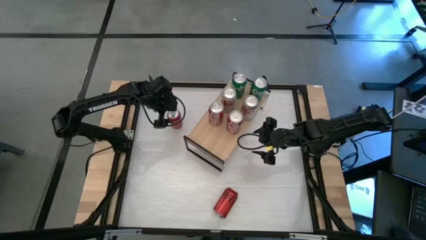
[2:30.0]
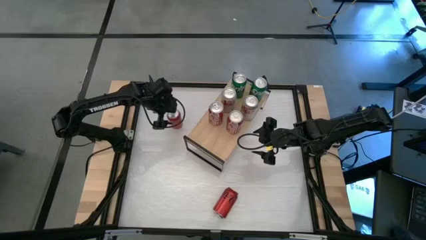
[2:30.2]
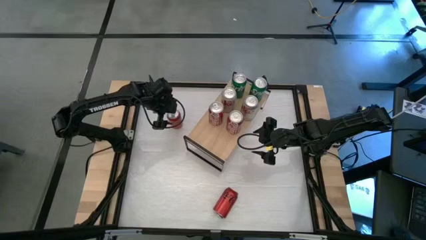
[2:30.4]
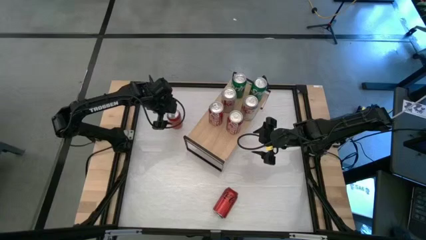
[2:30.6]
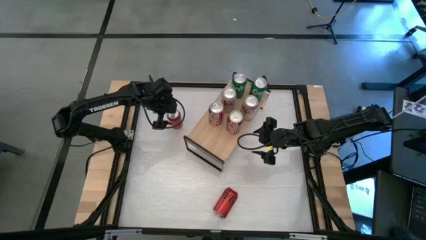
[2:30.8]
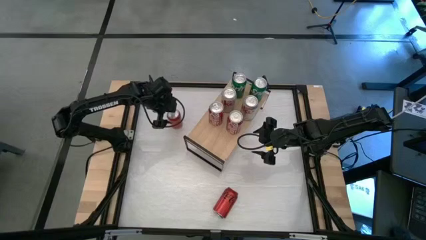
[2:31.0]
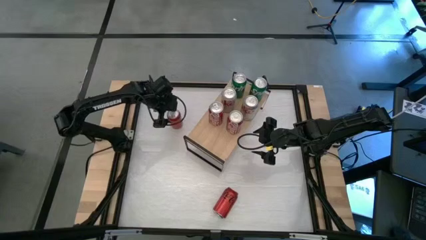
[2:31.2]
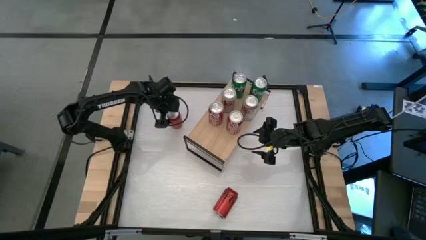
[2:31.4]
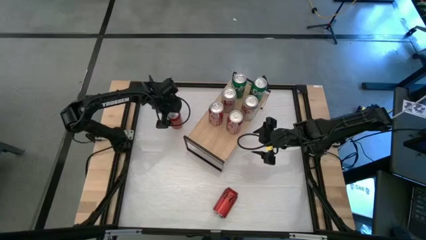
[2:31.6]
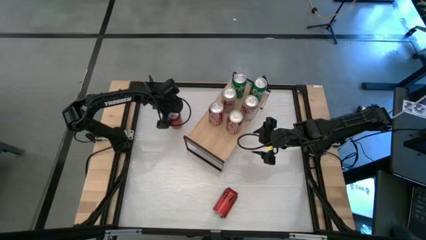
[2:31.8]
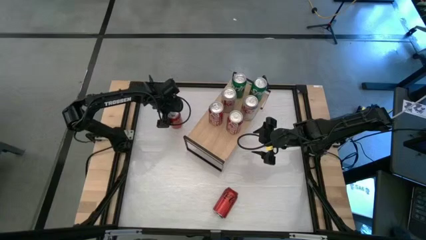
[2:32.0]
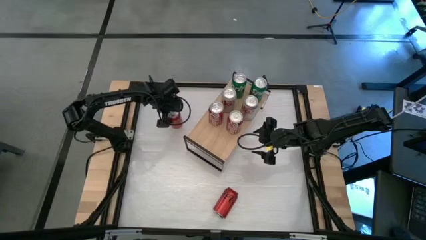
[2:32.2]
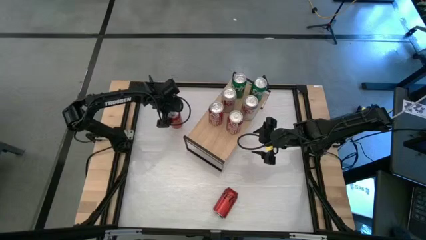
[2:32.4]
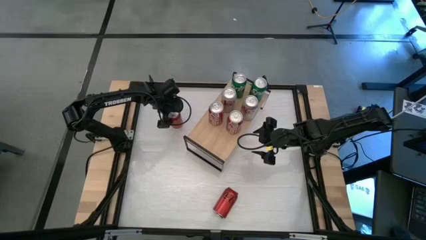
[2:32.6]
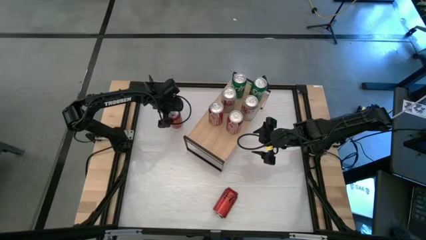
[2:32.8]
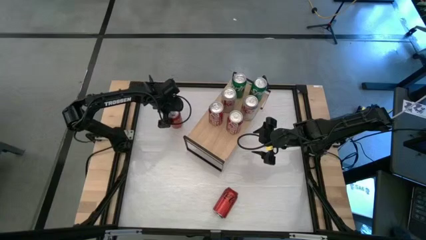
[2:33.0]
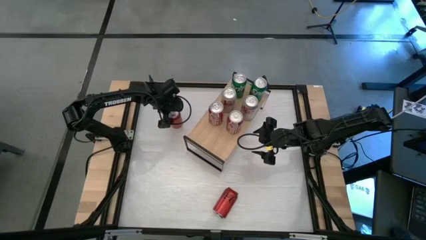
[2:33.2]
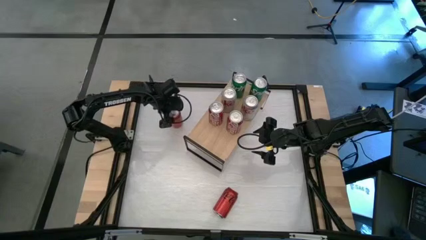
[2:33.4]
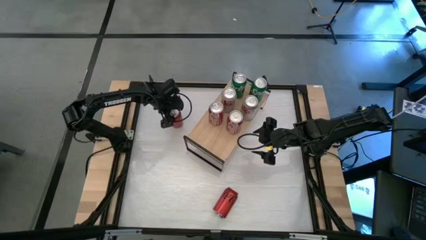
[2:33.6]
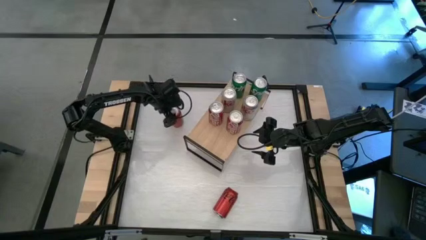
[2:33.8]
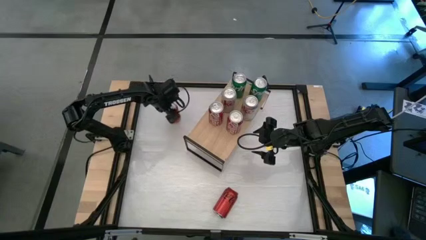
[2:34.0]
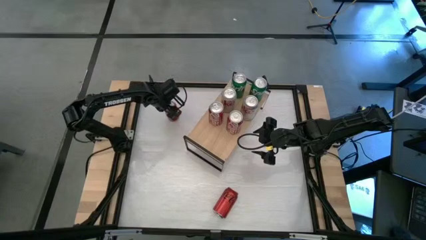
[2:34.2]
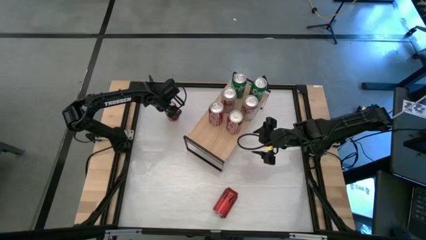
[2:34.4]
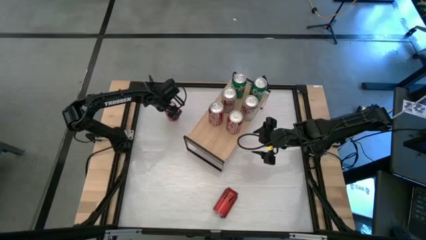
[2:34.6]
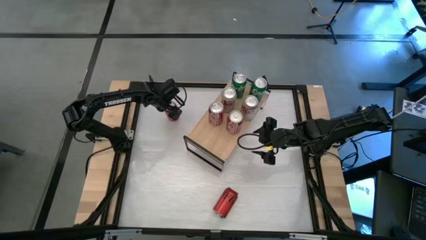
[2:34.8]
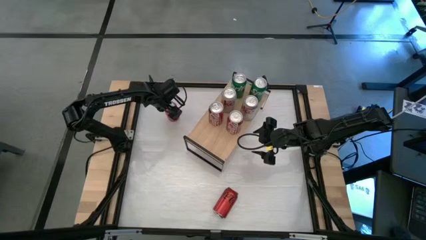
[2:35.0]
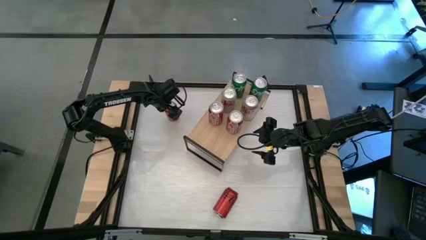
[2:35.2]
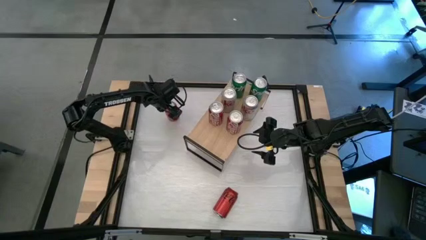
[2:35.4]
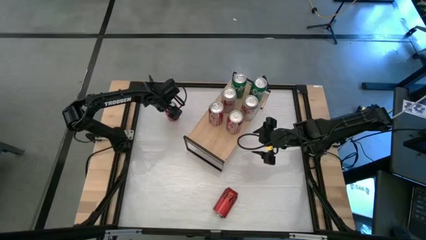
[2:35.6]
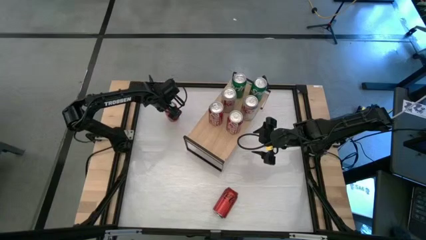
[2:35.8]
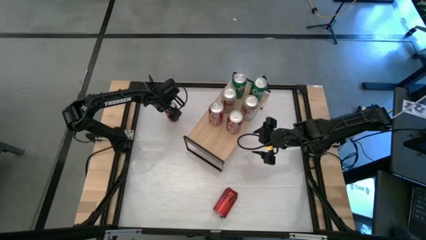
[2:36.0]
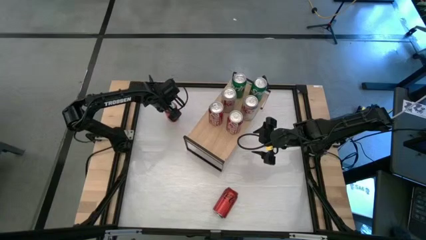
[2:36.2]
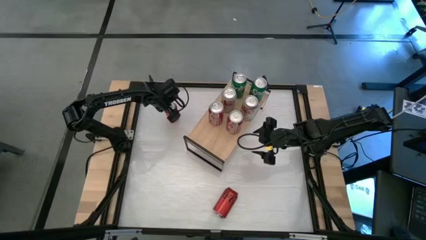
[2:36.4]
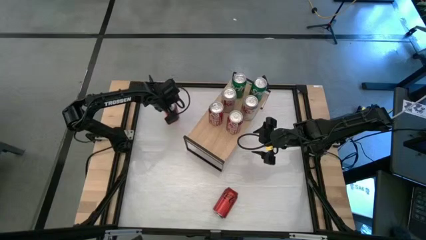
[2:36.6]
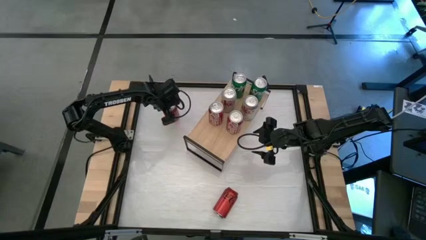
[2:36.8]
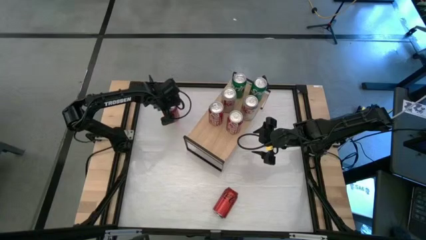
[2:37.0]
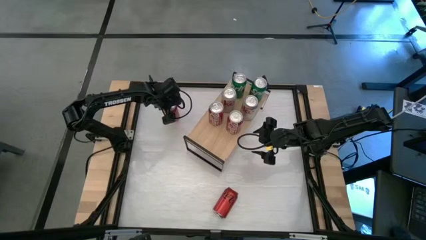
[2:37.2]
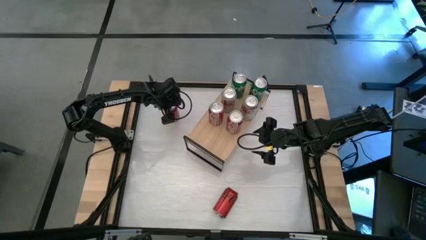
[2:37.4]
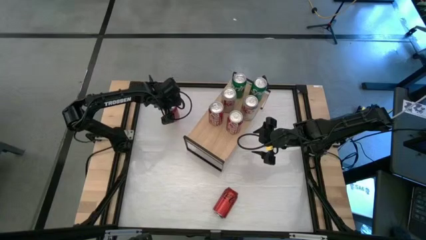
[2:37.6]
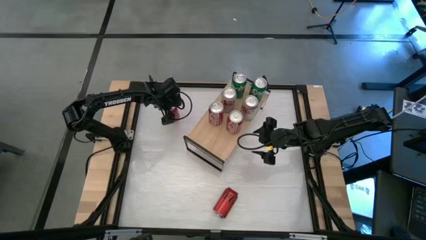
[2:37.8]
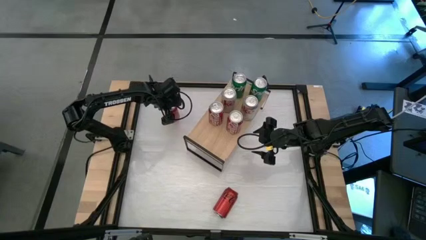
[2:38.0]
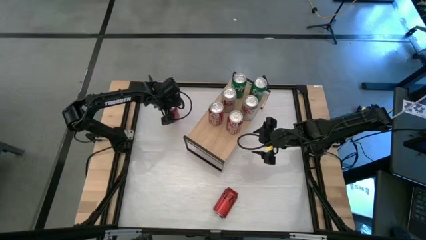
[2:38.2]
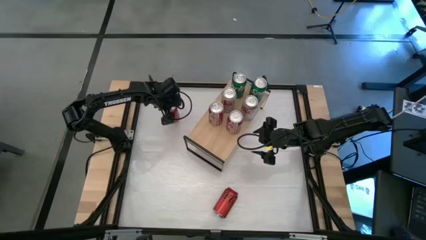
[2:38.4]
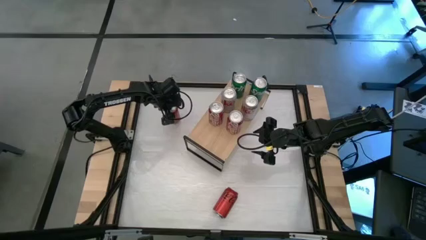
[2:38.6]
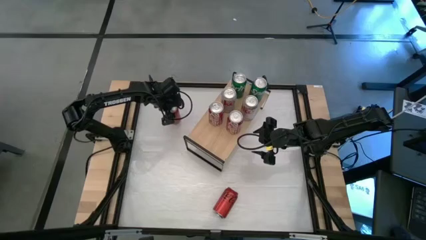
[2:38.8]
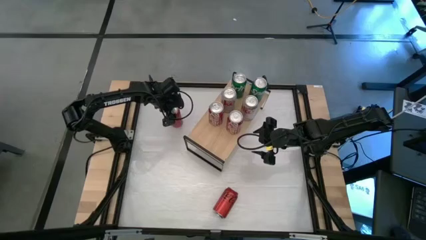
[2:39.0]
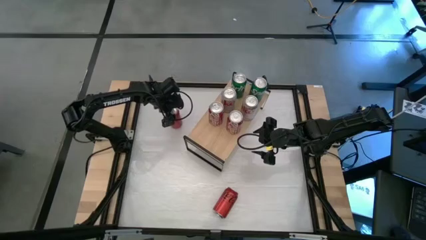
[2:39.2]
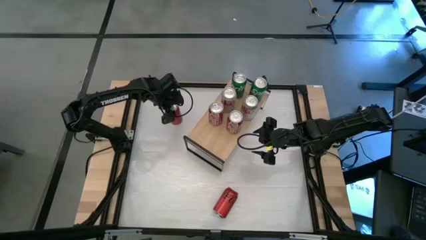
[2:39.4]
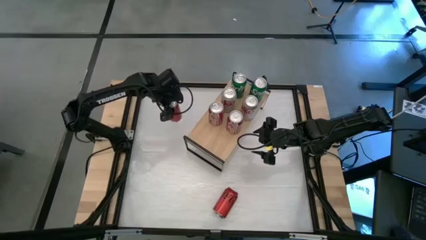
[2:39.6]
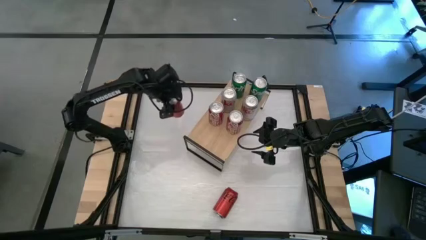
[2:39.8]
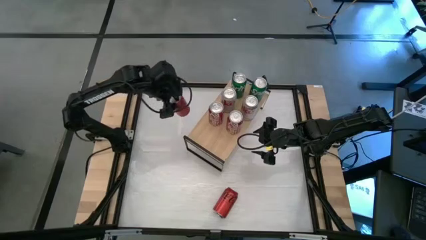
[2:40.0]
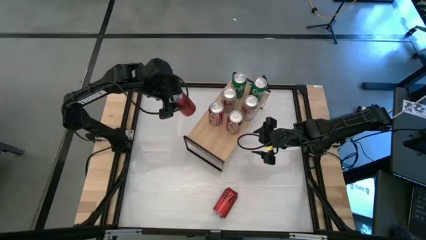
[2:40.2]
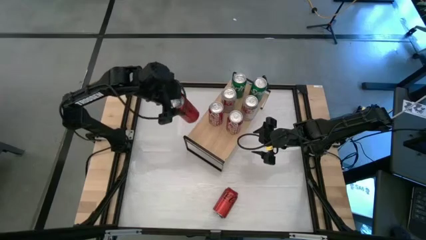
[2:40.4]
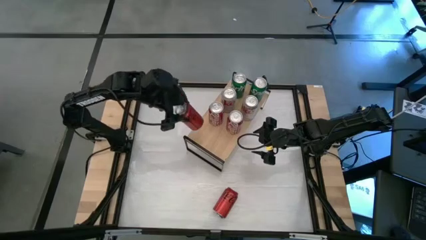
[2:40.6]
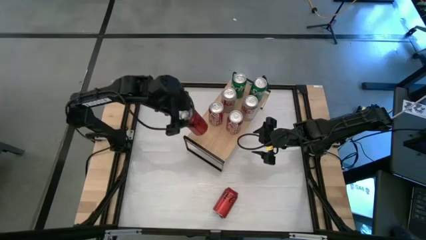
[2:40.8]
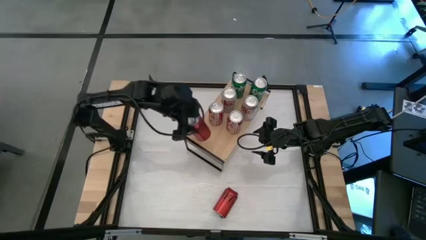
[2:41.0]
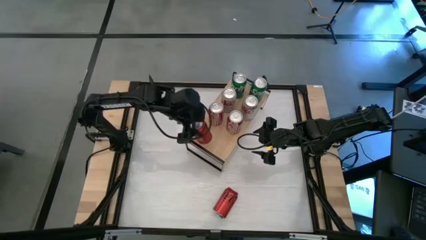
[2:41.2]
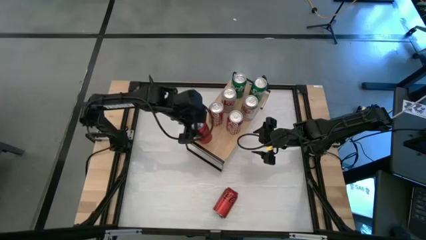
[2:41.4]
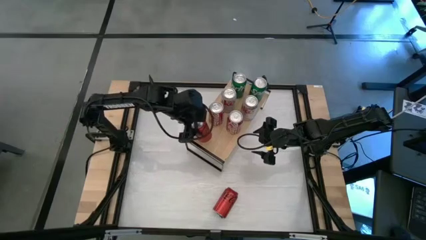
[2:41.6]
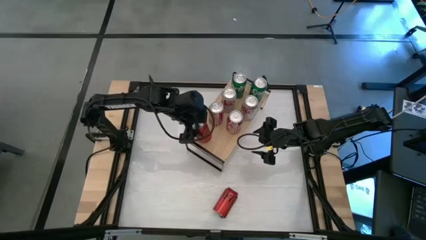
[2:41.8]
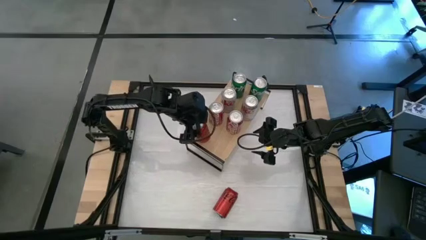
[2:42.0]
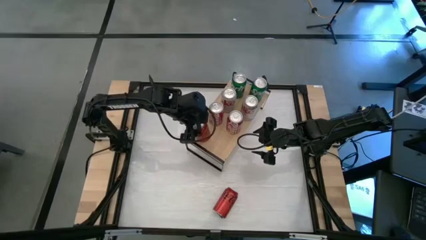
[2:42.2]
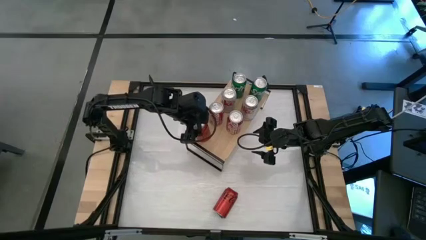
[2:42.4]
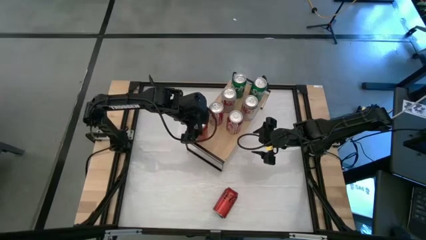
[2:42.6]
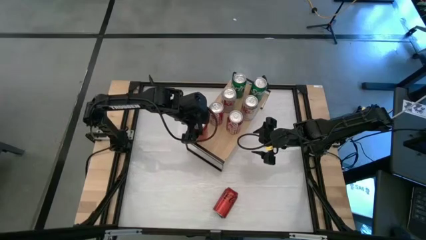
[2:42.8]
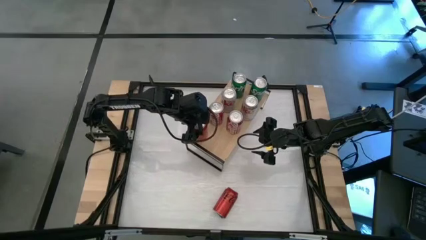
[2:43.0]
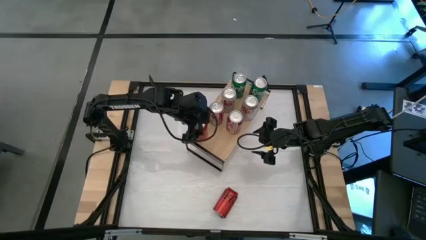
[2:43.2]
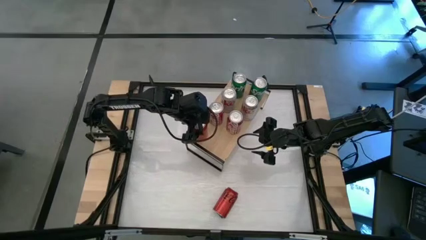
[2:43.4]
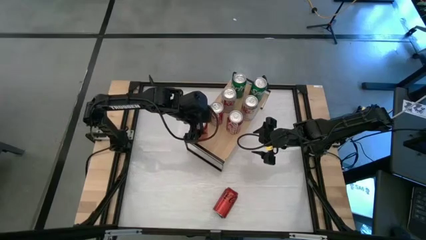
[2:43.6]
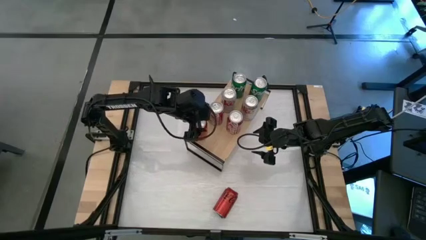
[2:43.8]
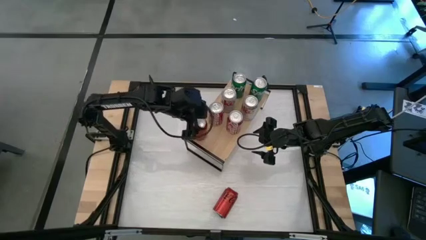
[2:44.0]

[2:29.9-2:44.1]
Task: Place canned beverage on shelf
Put the left red-black soda can on the shelf
